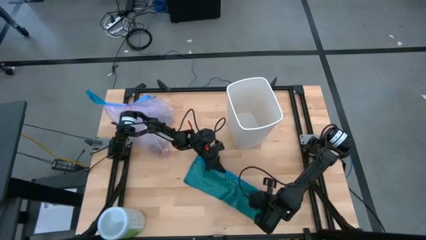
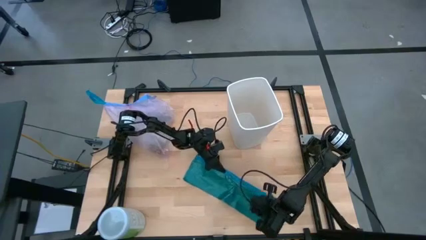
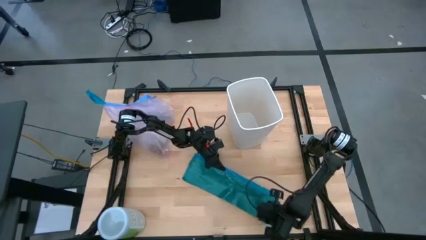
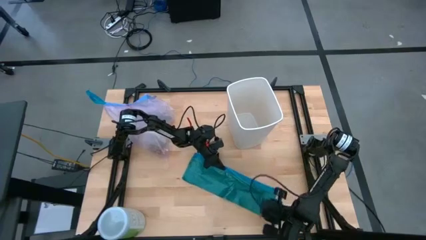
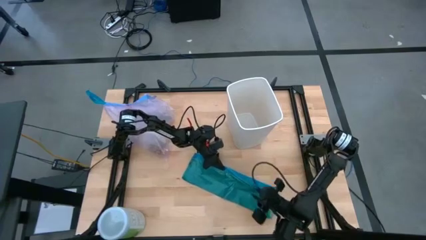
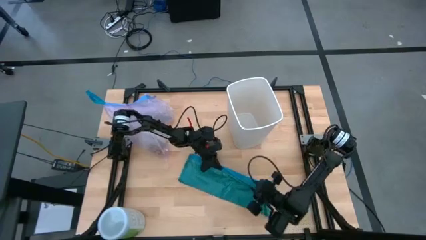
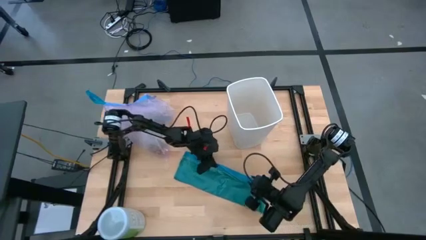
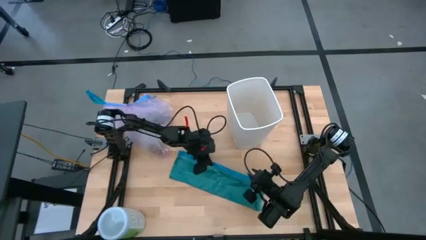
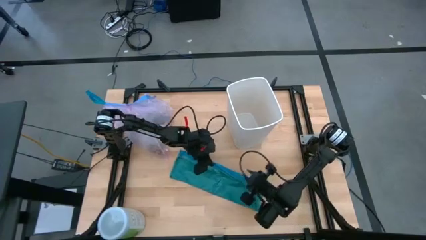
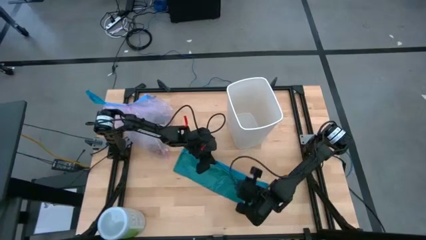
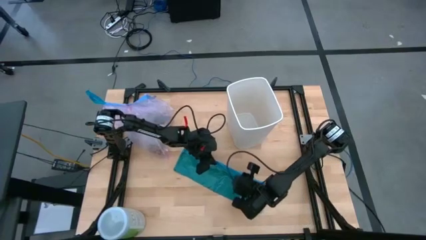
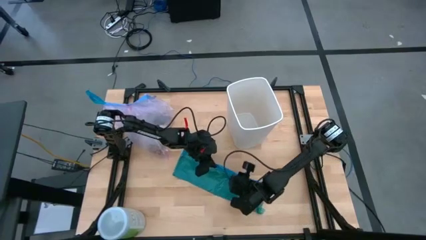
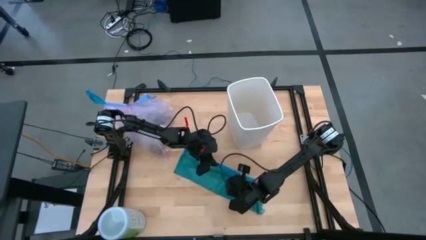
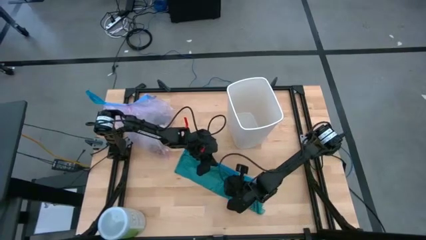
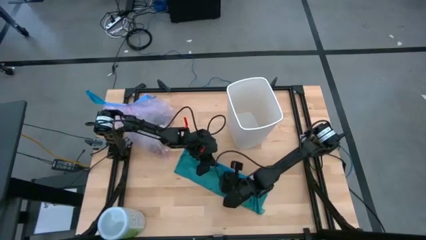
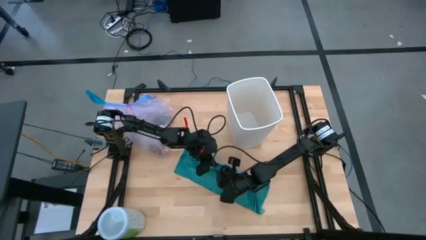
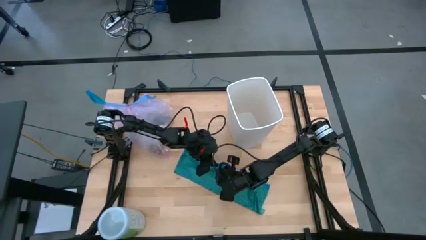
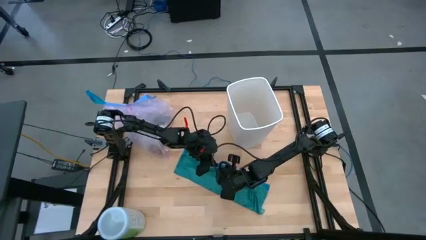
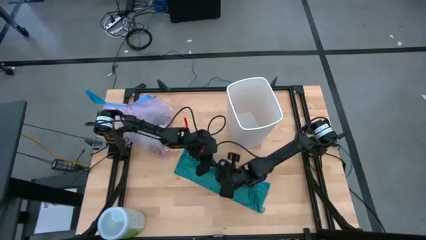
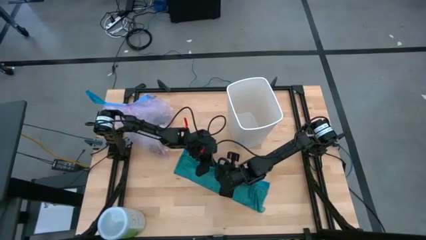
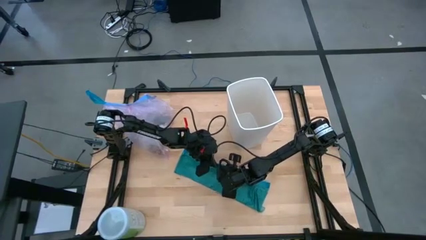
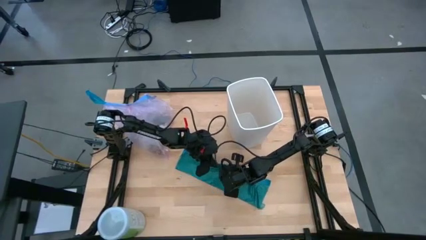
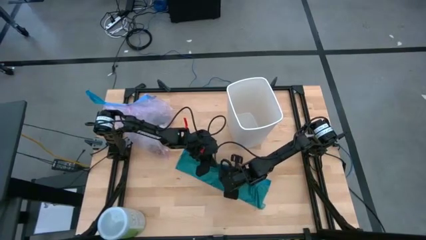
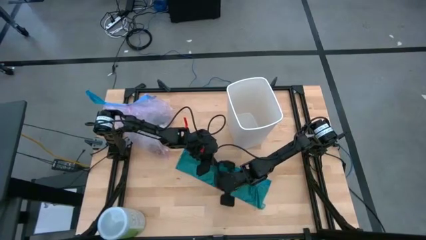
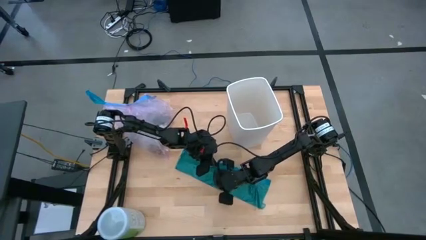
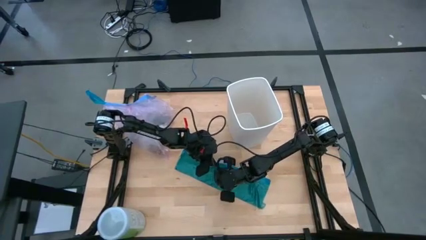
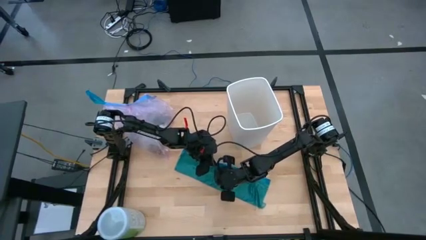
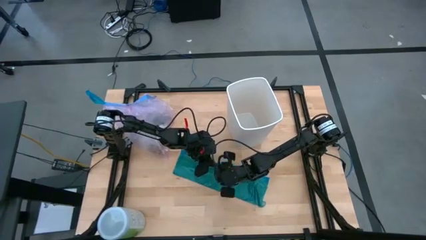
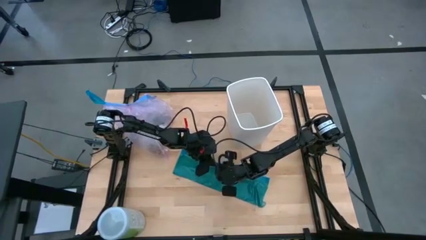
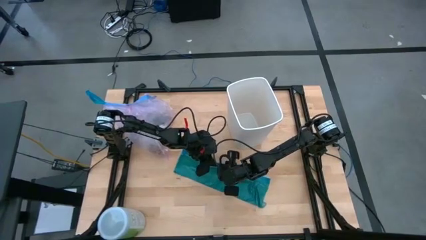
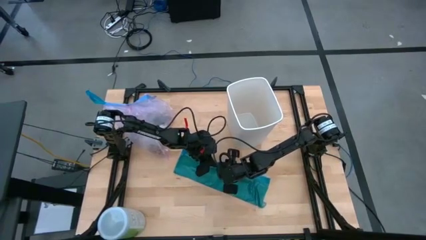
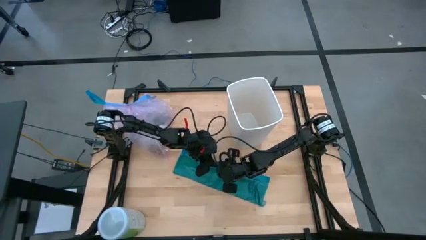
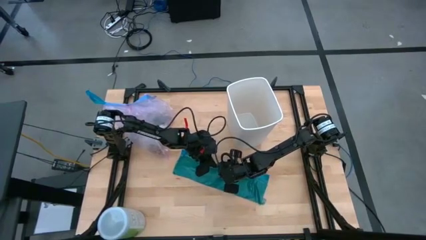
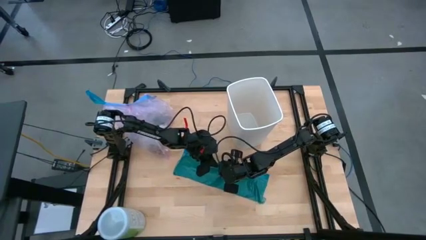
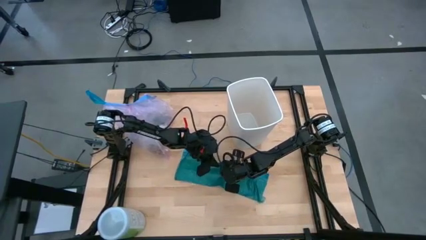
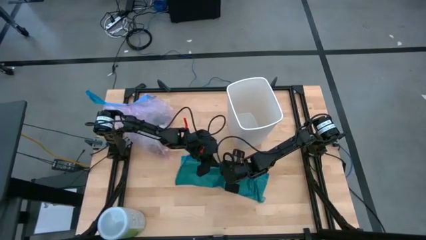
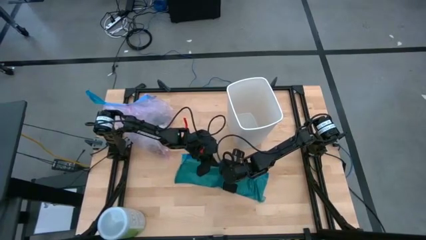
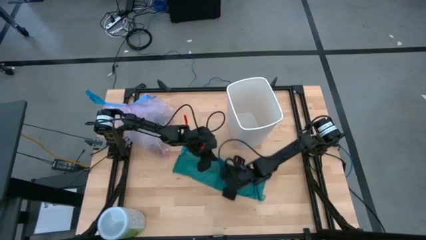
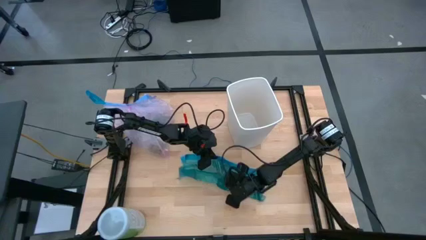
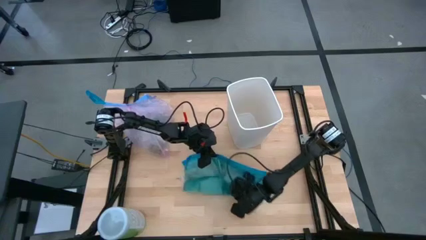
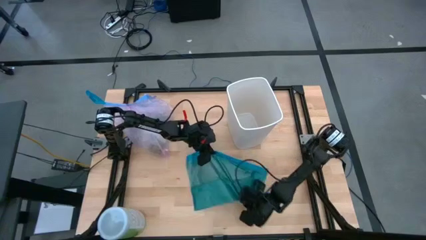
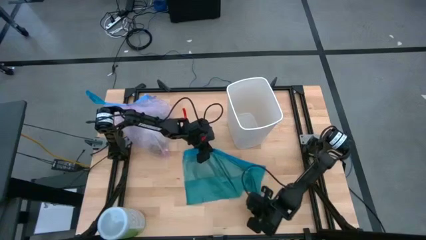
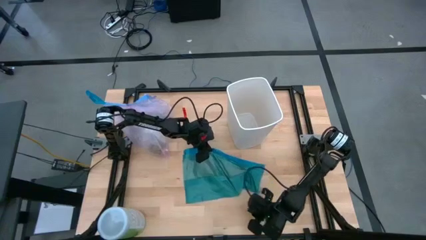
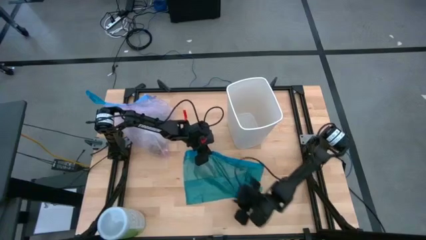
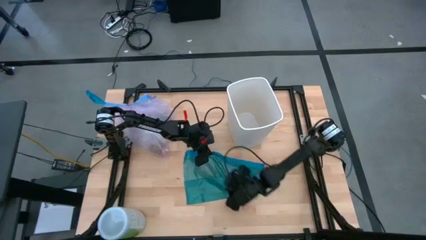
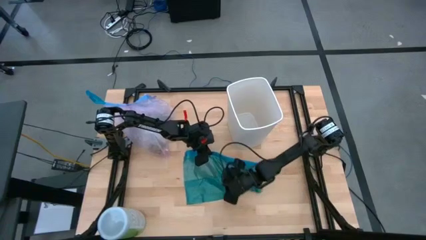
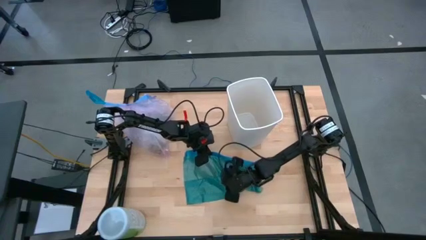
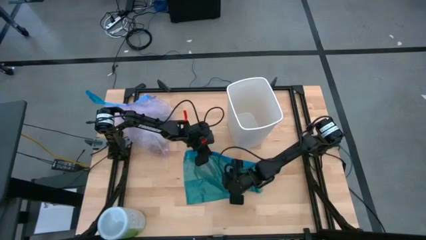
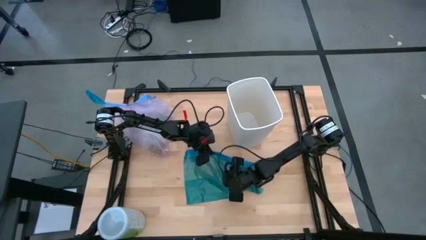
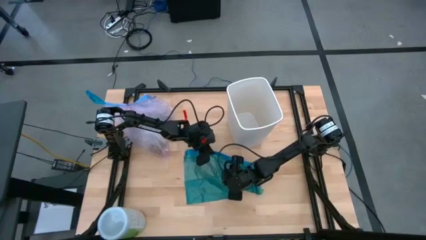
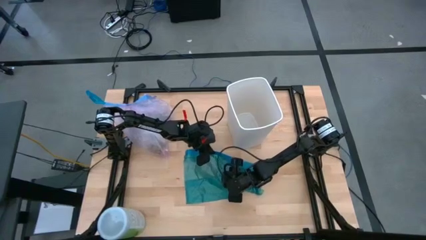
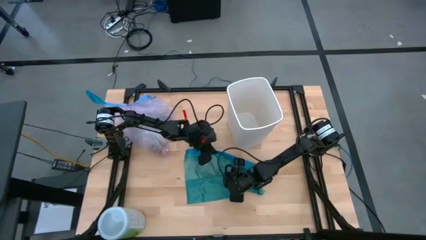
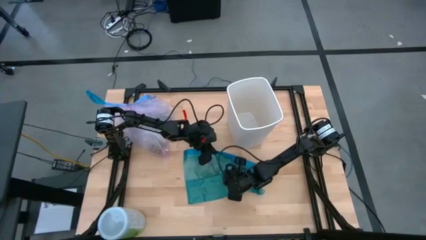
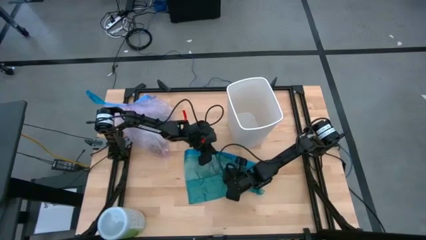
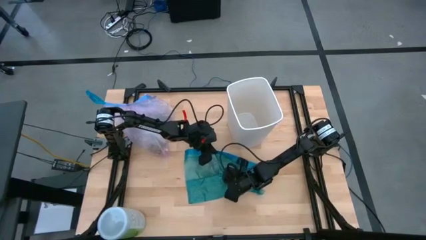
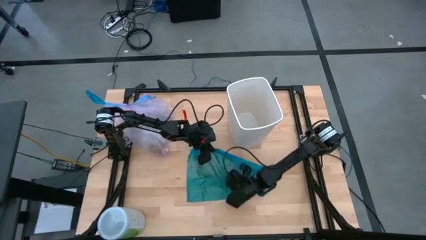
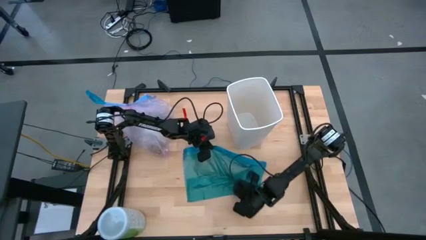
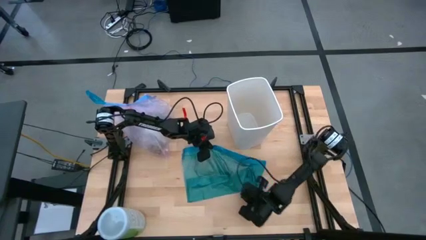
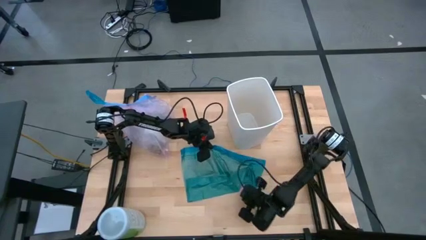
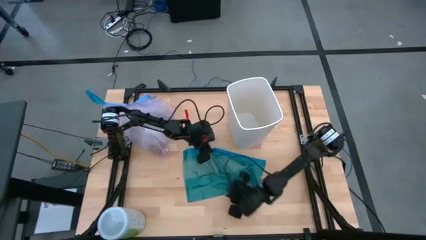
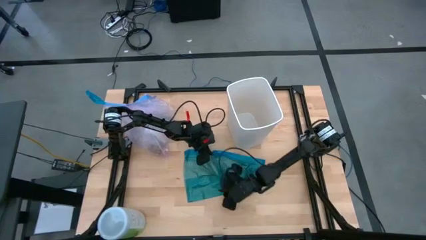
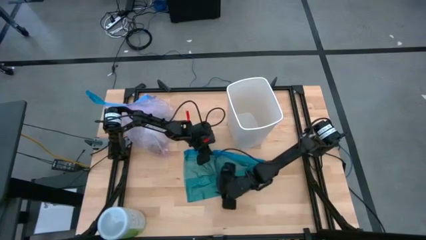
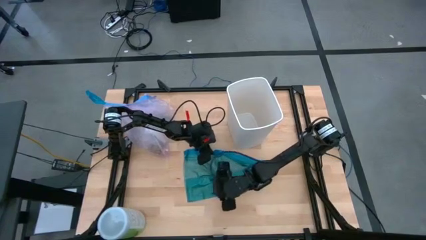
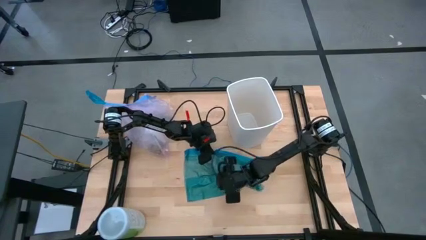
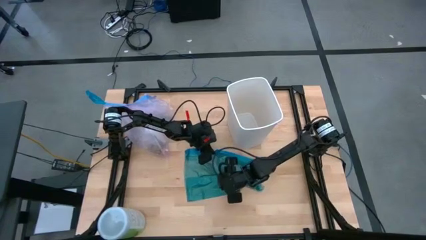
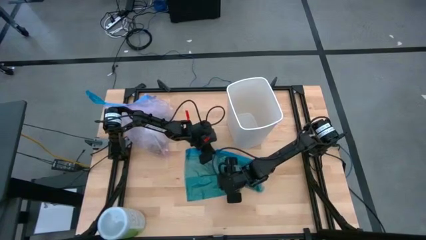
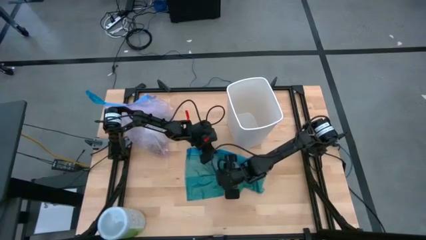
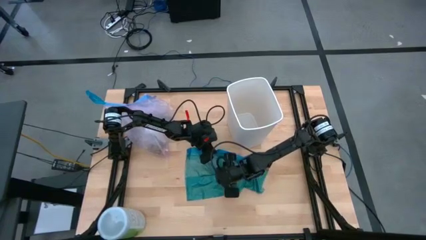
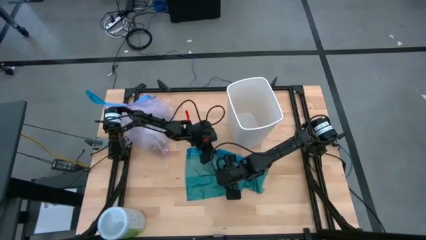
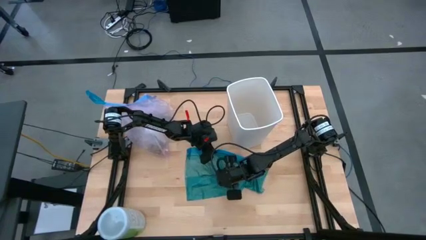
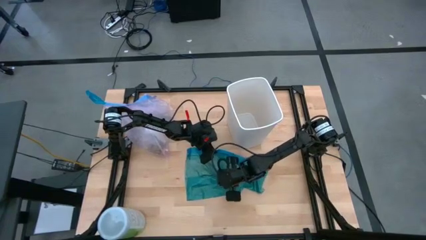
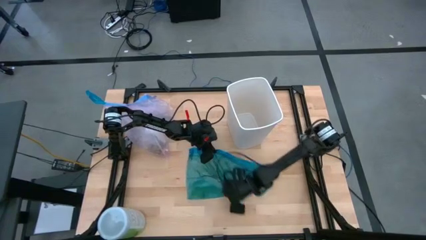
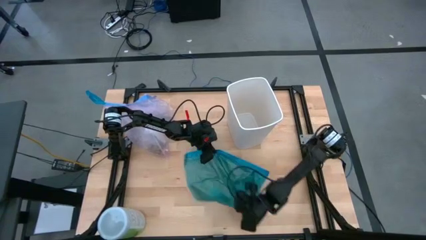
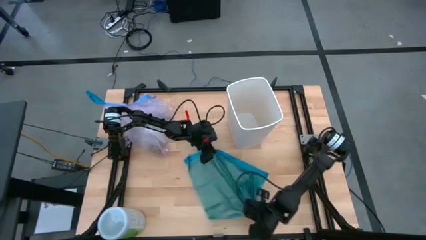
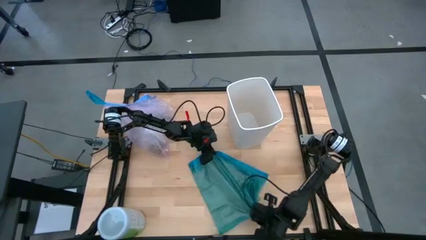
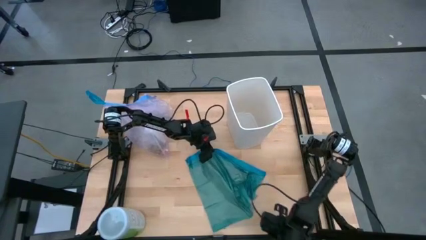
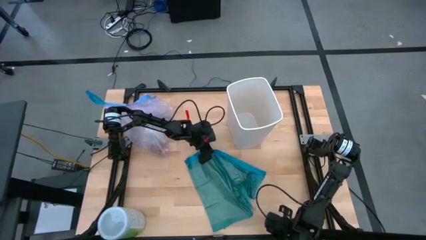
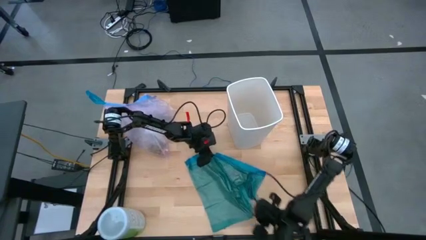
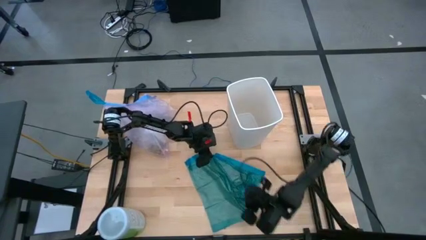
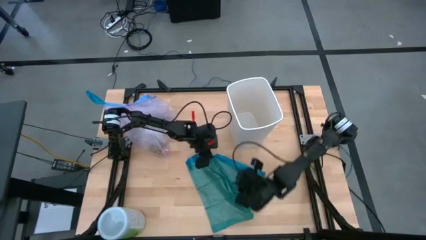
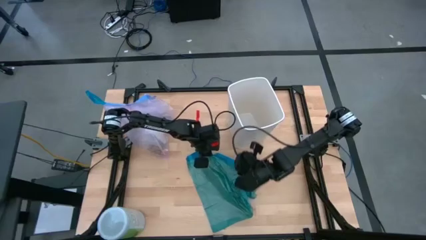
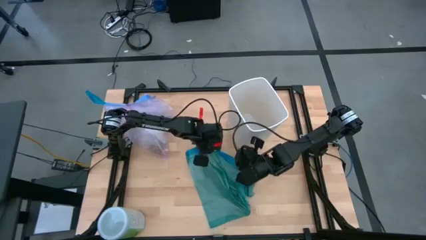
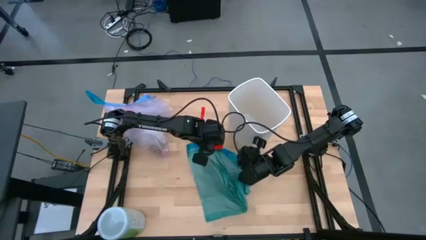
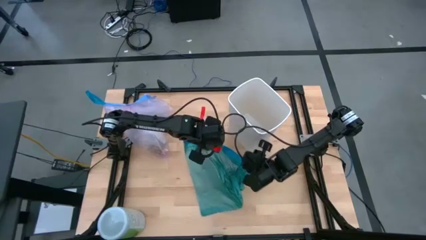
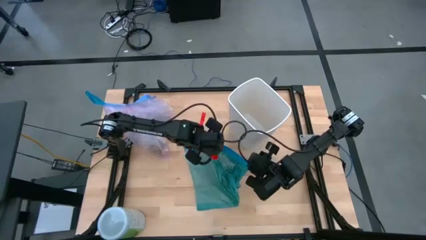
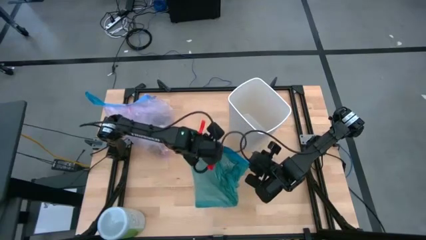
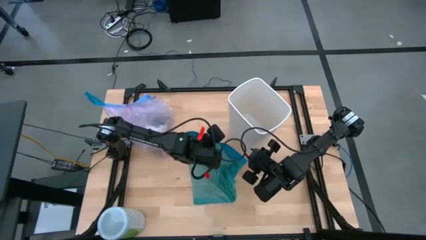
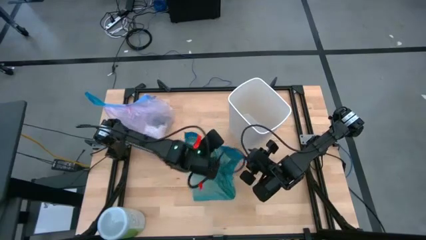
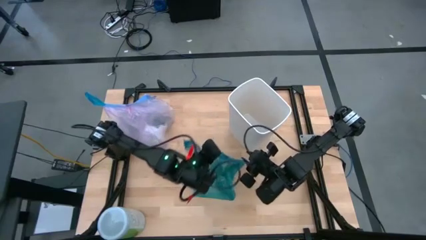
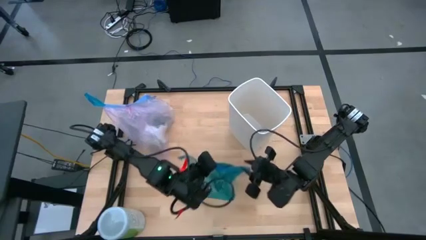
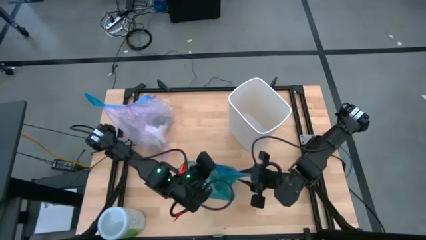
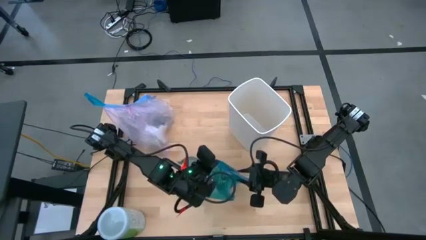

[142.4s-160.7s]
Task: place trash/remove bag and relplace
Put the blue trash bag into the white trash bin
